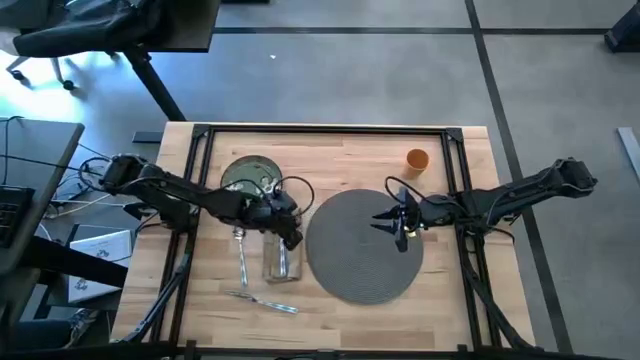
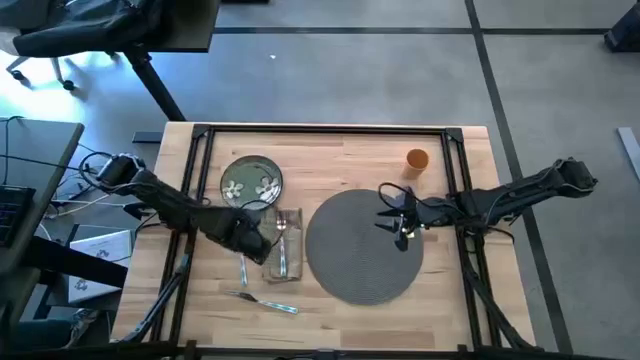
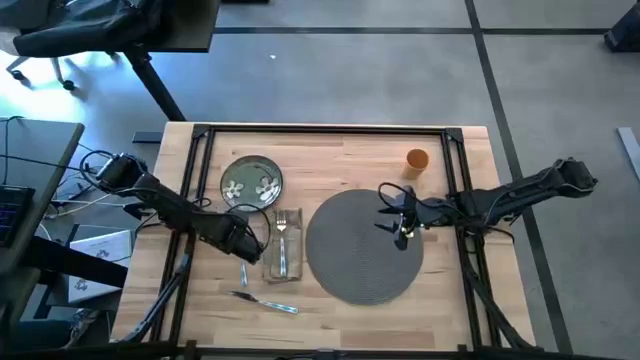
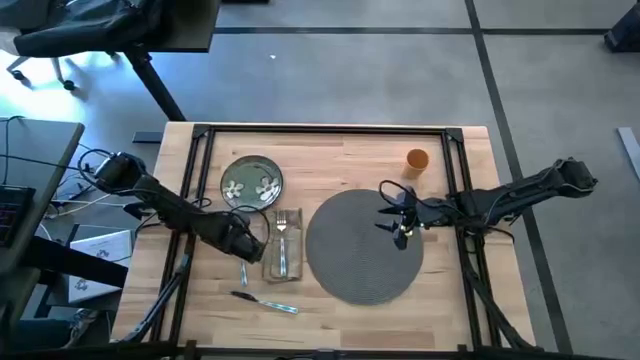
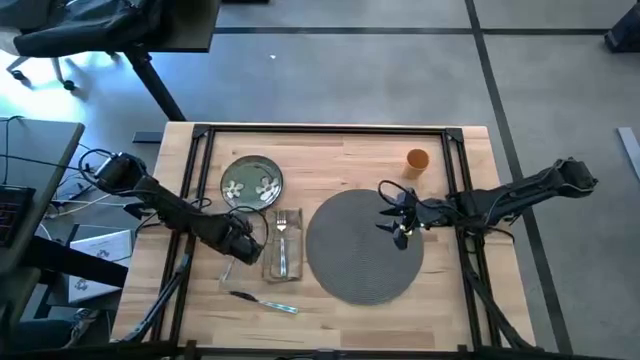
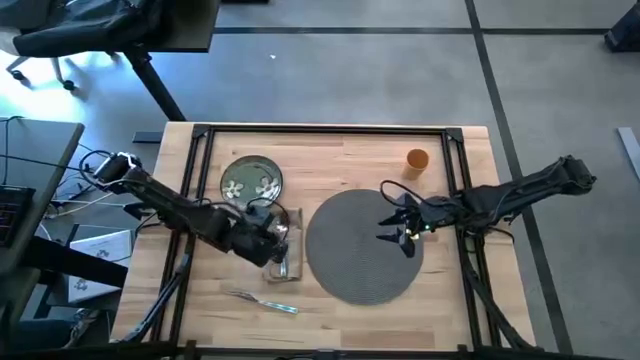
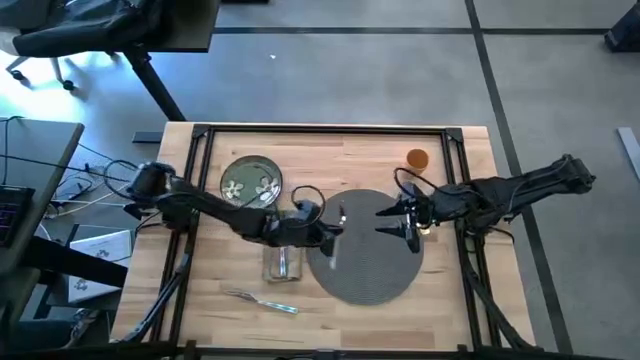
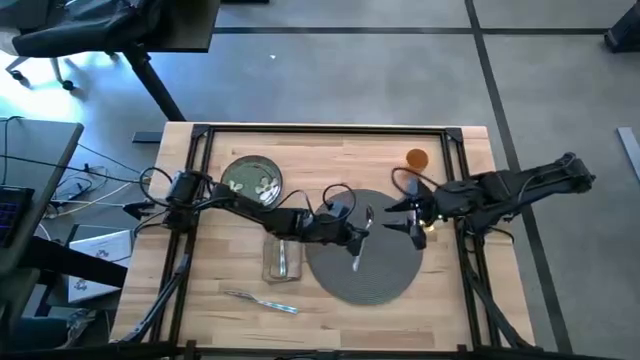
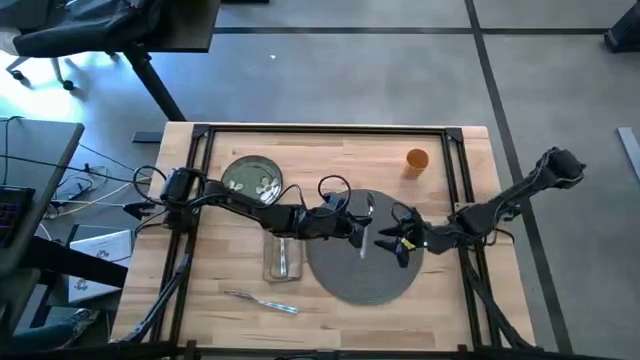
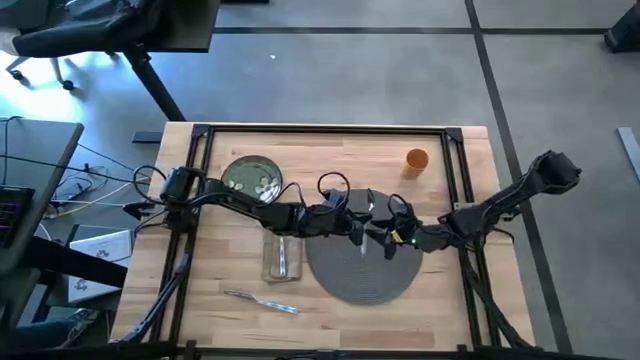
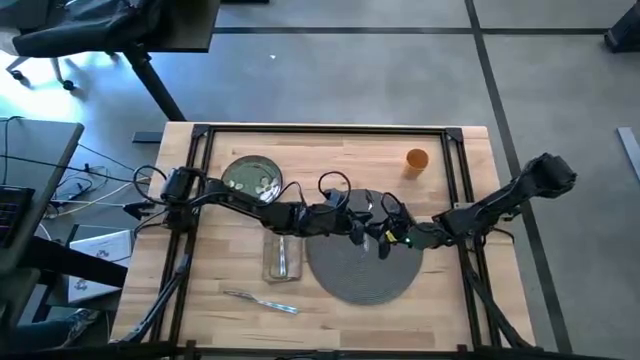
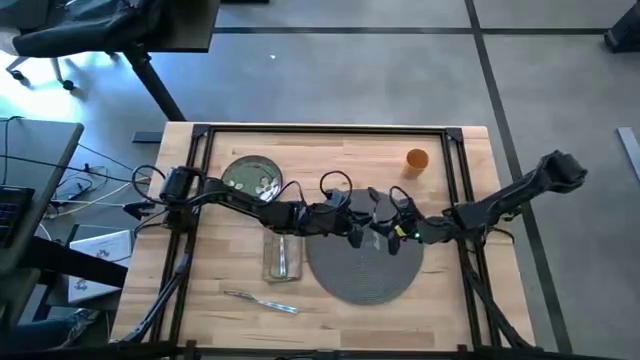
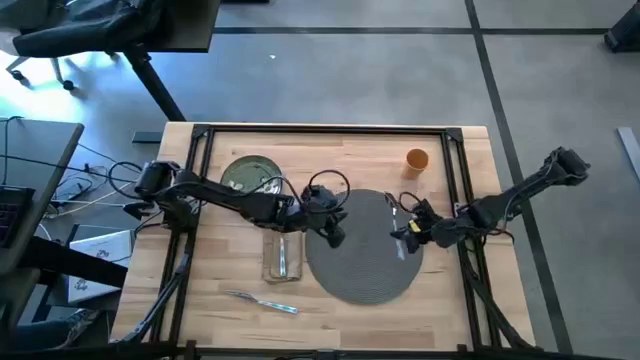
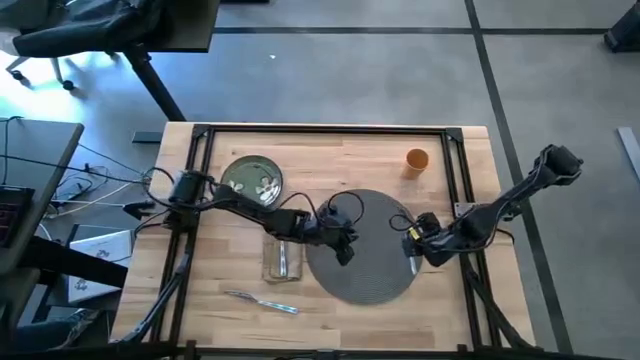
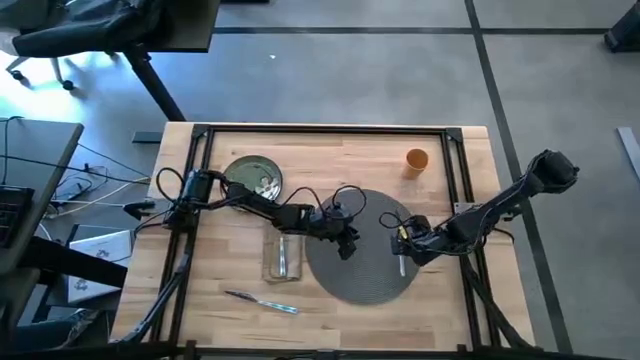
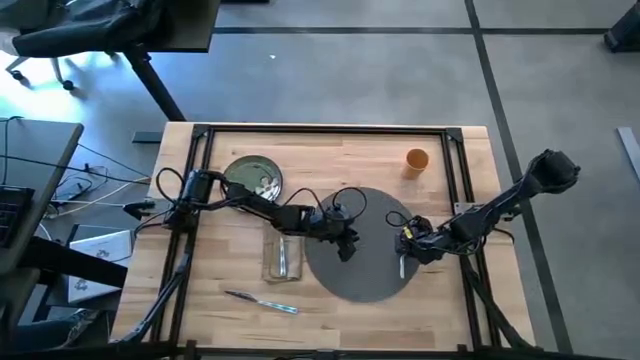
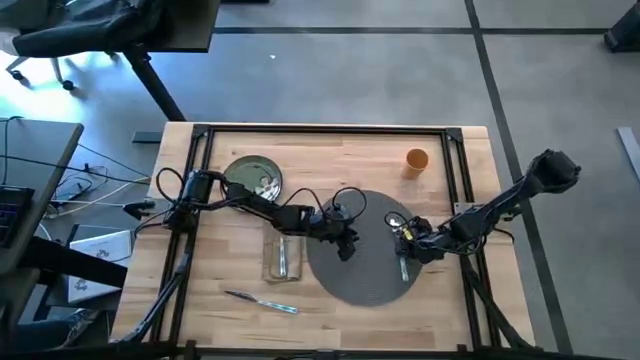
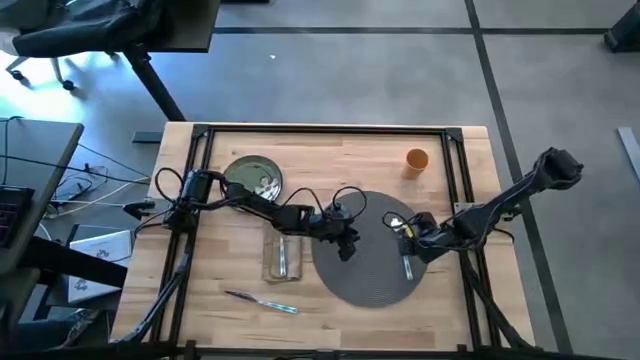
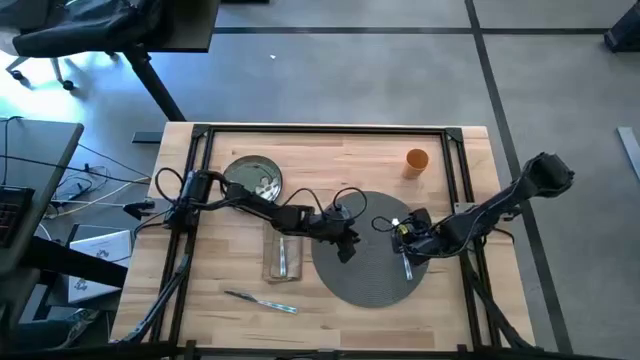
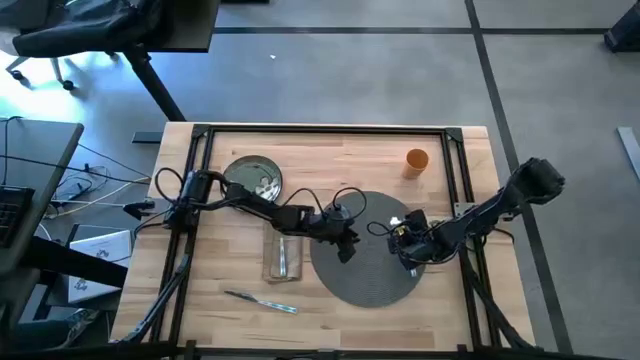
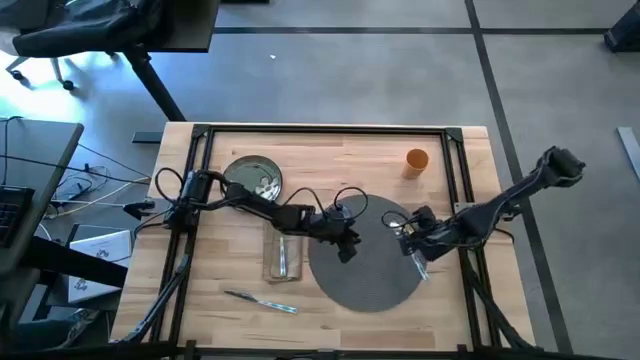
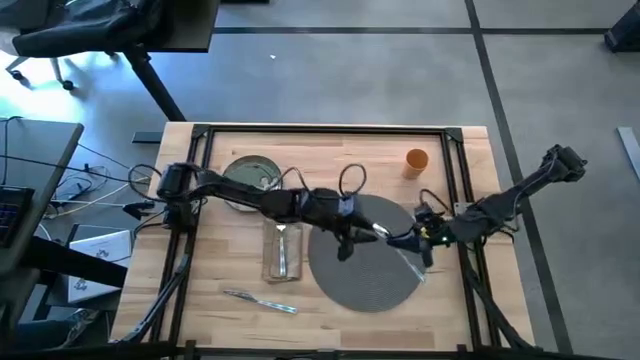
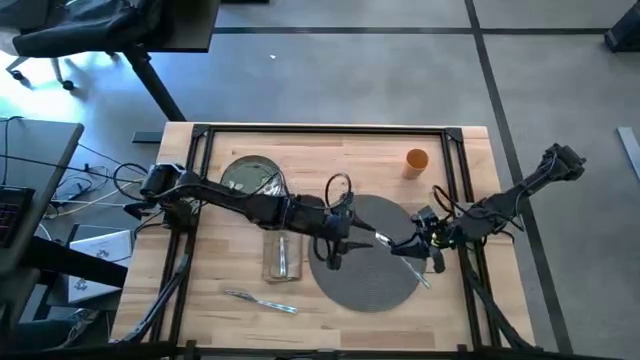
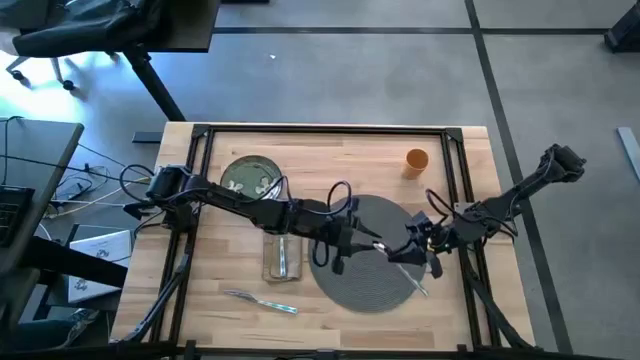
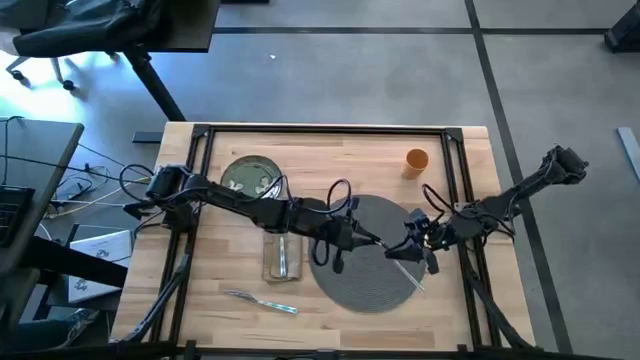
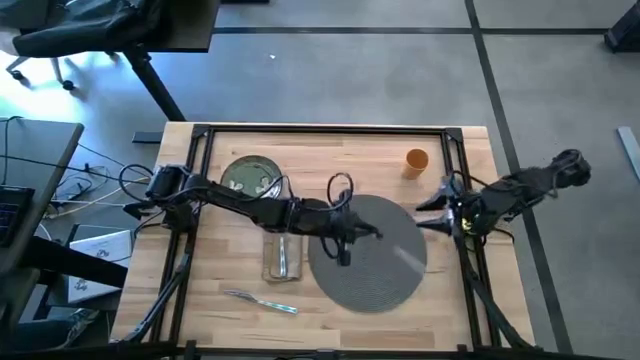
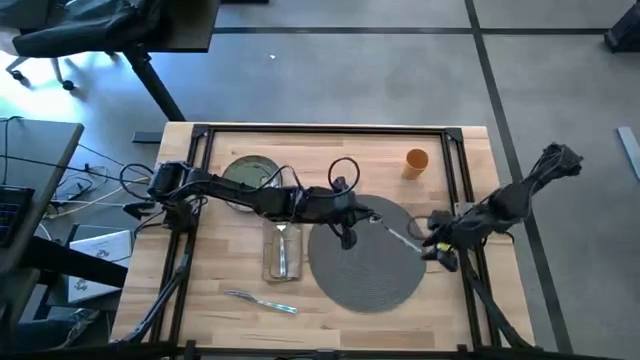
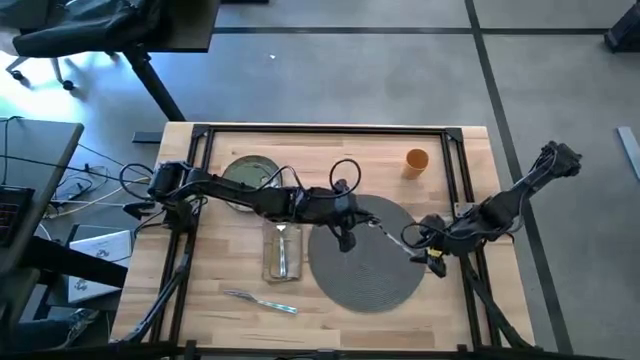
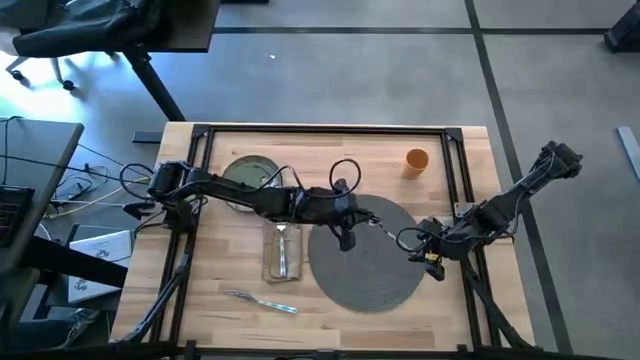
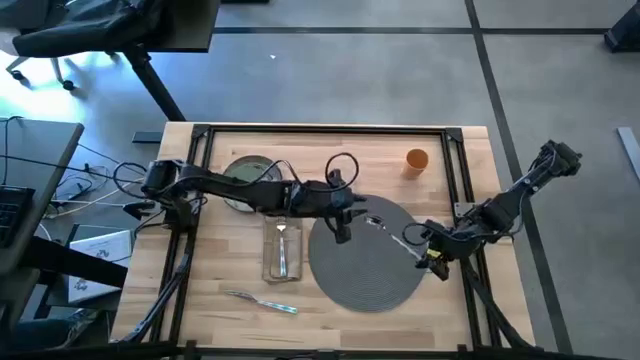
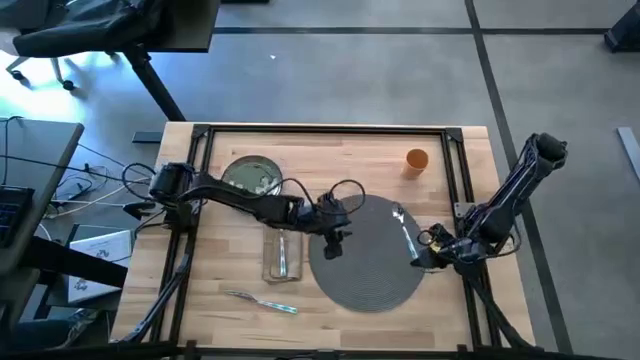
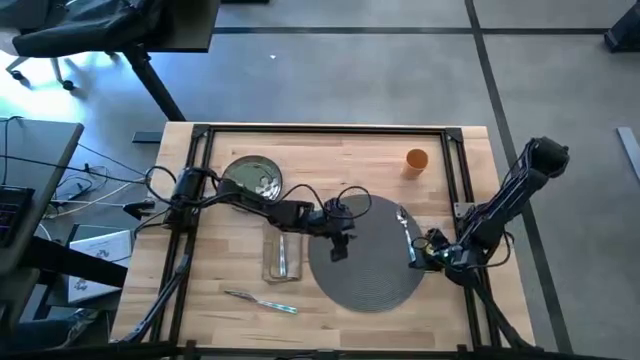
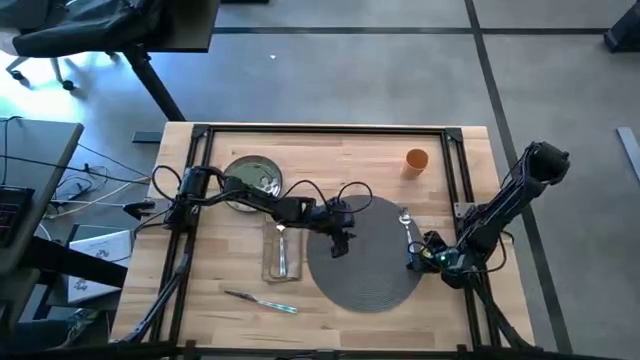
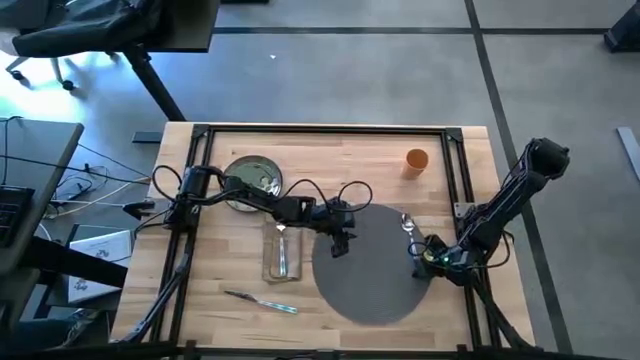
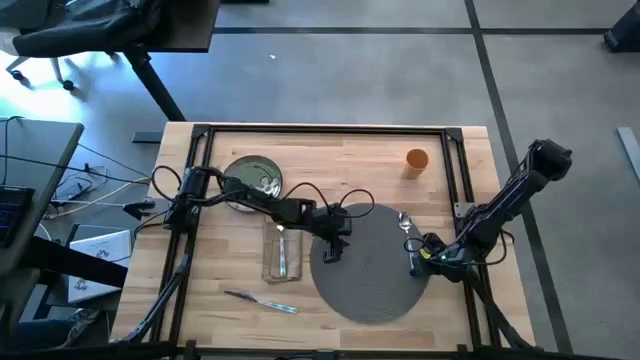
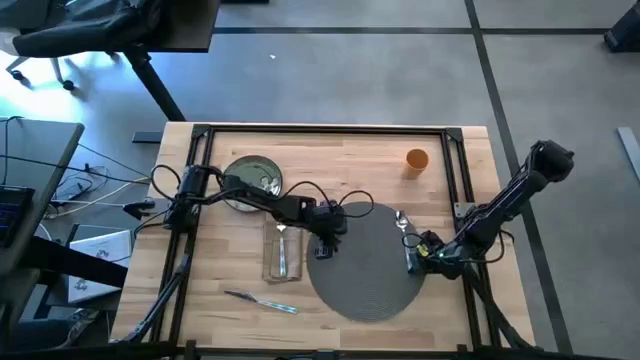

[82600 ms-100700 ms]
Task: Set table place
Put the blue spoon on the gray placemat

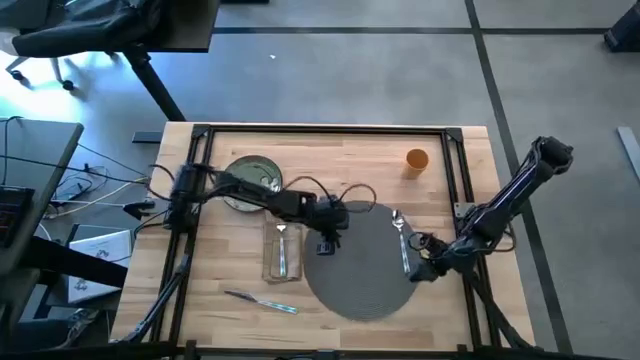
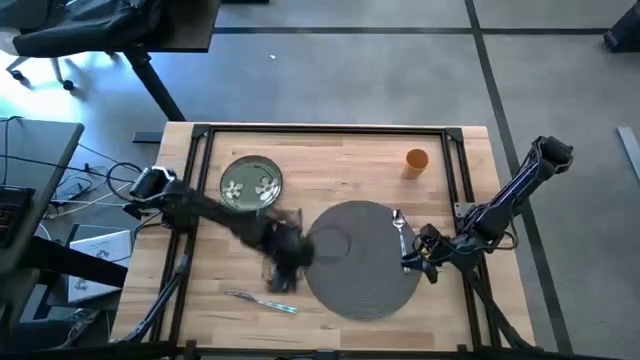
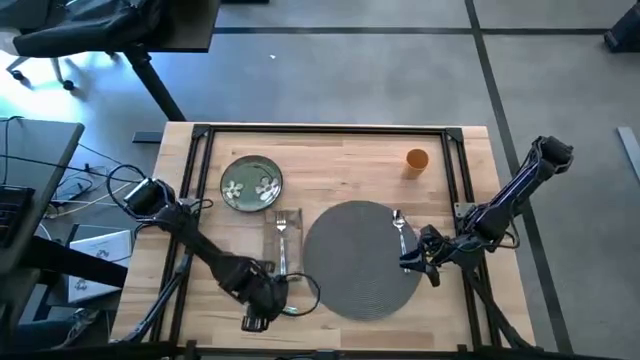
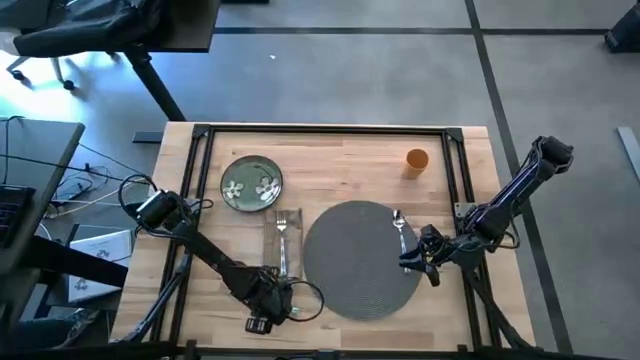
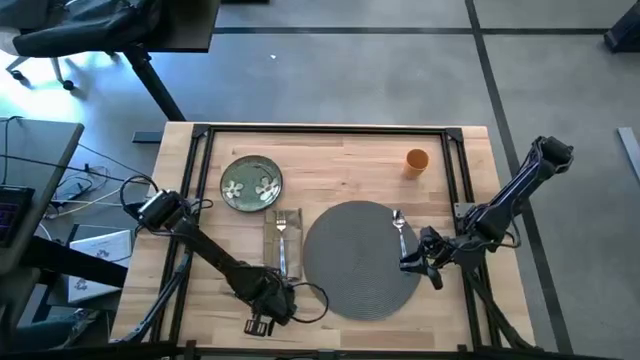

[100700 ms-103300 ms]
Put the blue table knife to the left of the blue spoon on the gray placemat

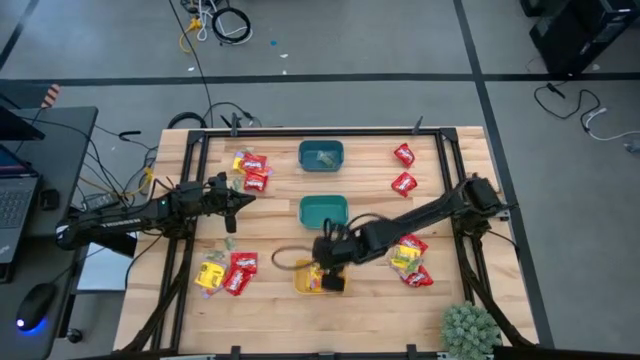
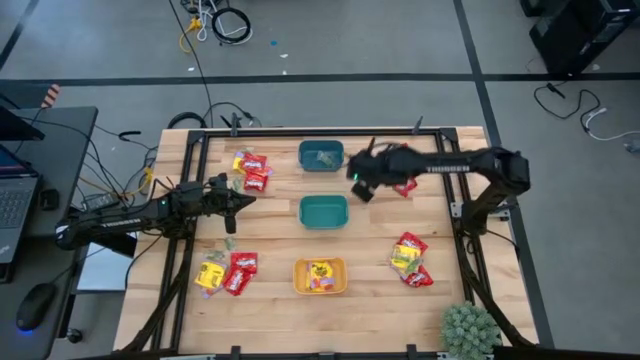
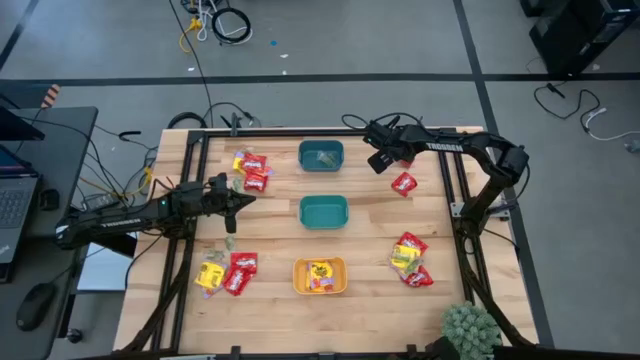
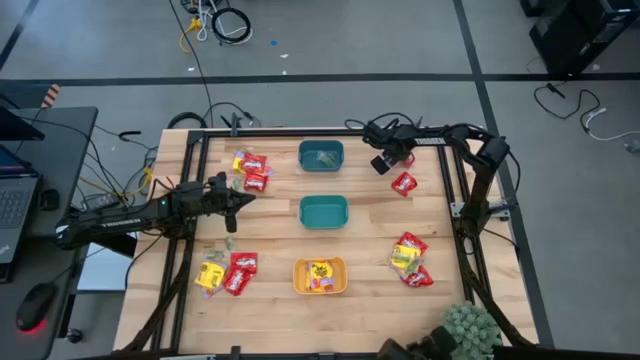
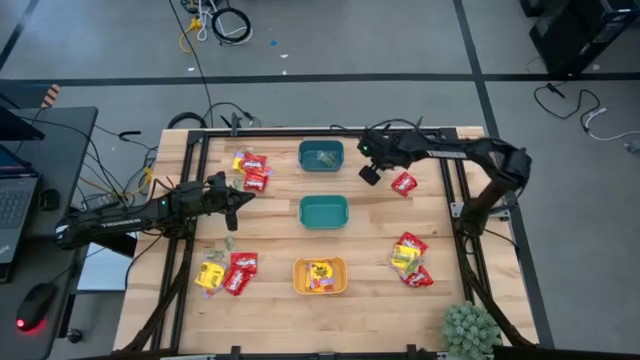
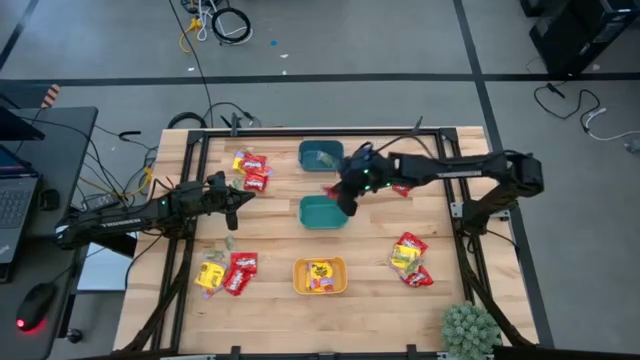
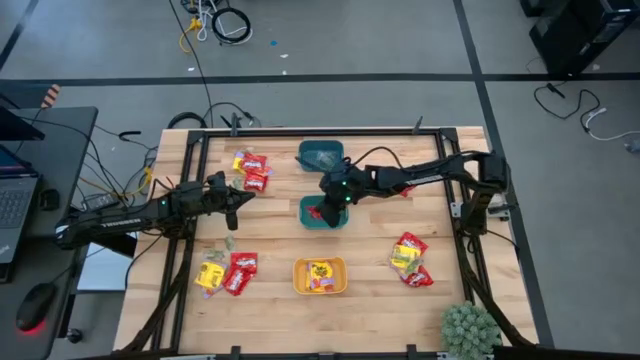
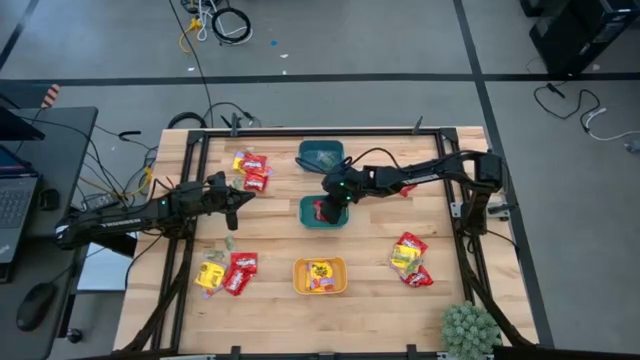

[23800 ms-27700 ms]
Task: Sort candy
Put the red candy into the green bin
